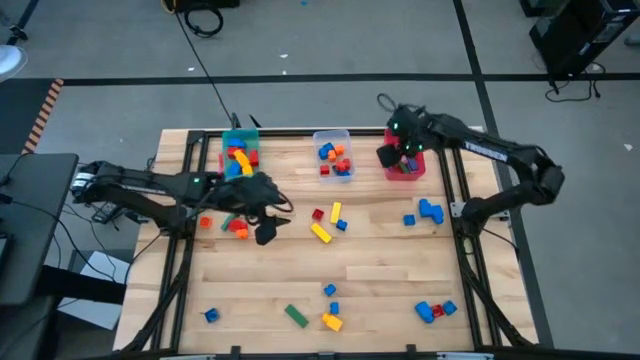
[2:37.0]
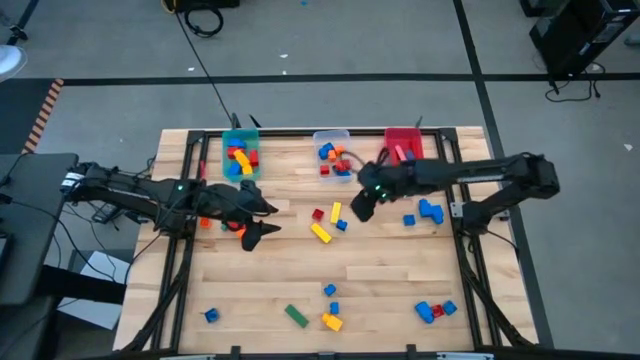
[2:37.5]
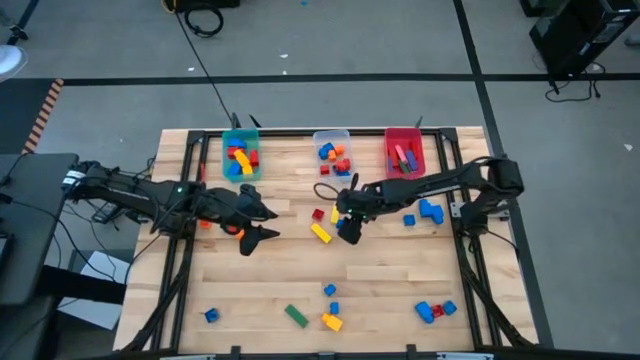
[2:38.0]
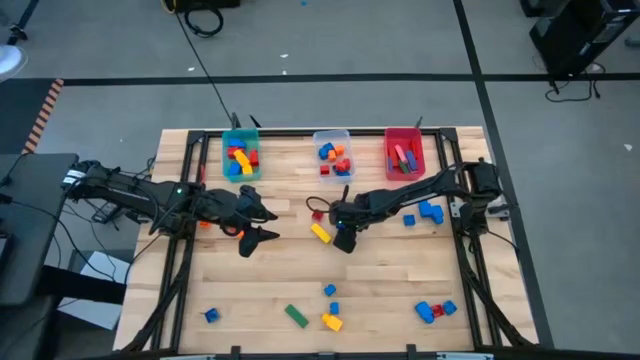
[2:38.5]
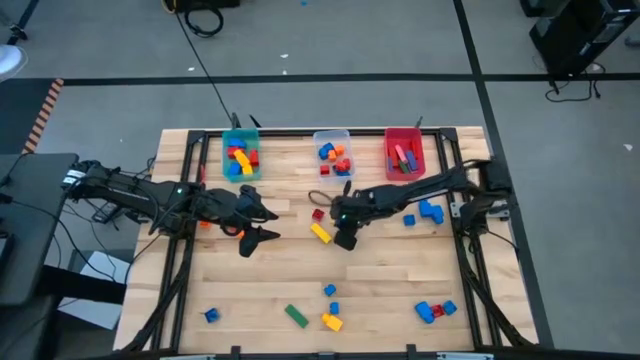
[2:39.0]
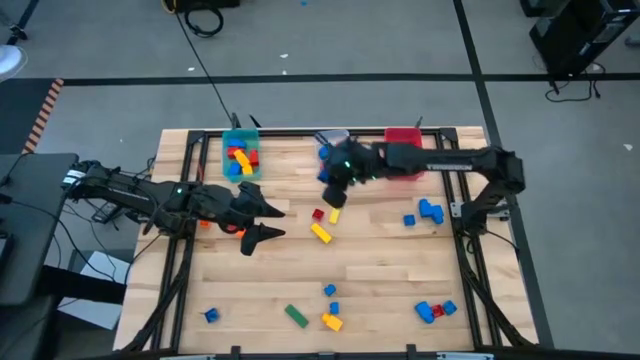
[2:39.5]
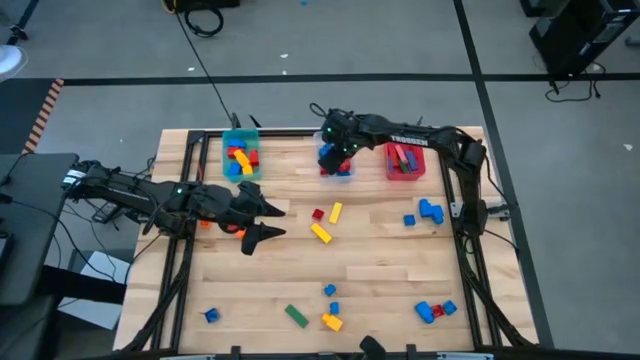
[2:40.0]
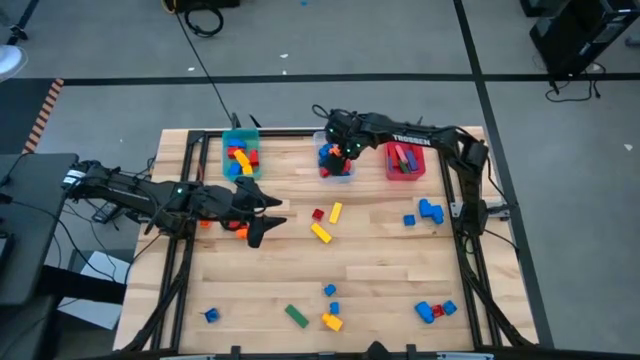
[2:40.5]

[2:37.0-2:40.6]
Task: Sort blocks by size
Put the blue 4 stud game piece into the transparent bin

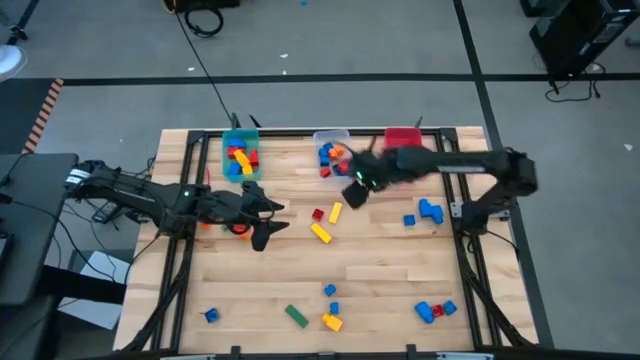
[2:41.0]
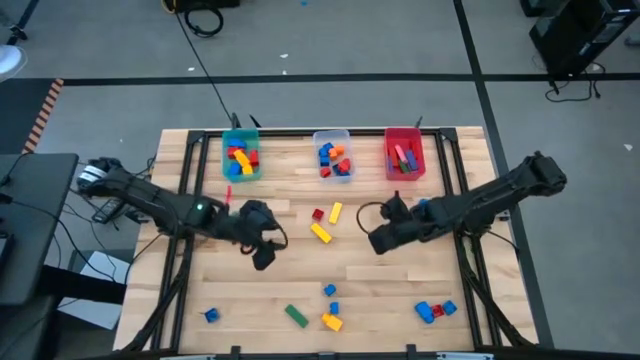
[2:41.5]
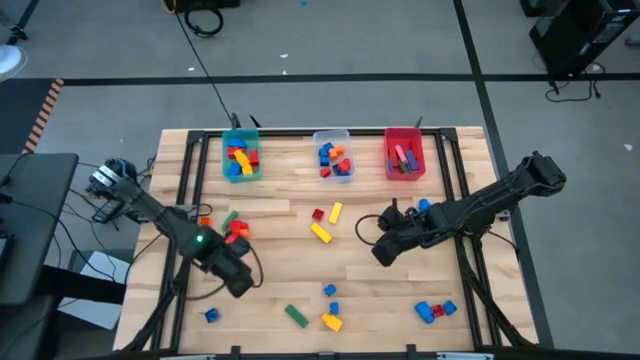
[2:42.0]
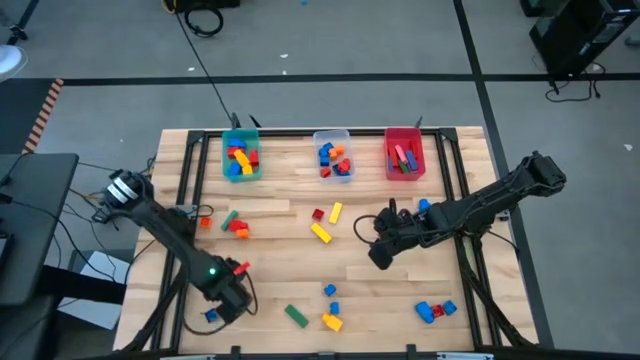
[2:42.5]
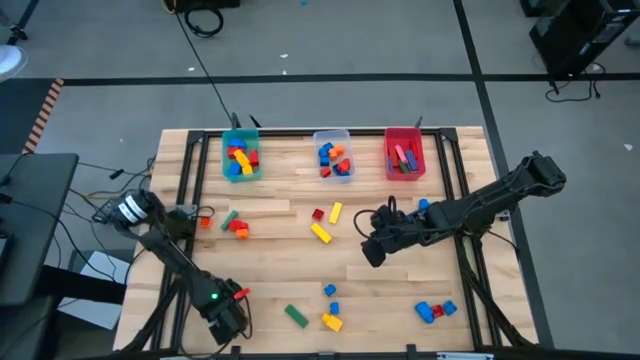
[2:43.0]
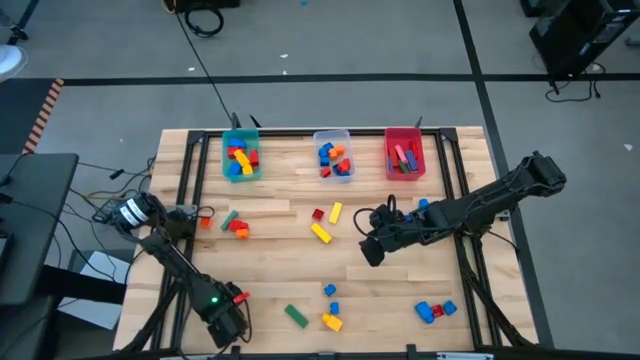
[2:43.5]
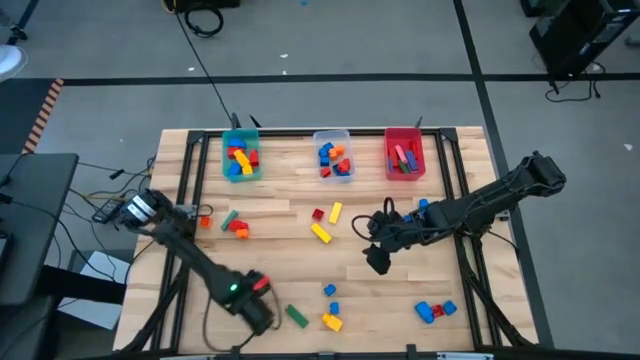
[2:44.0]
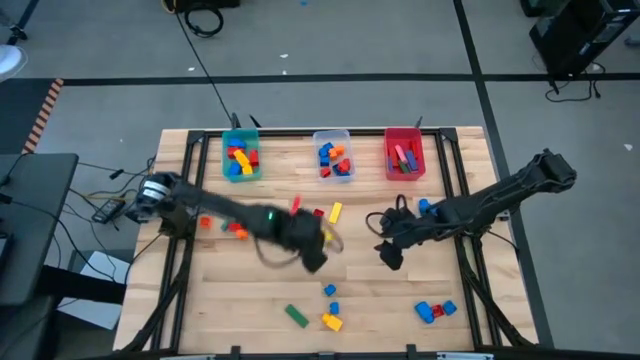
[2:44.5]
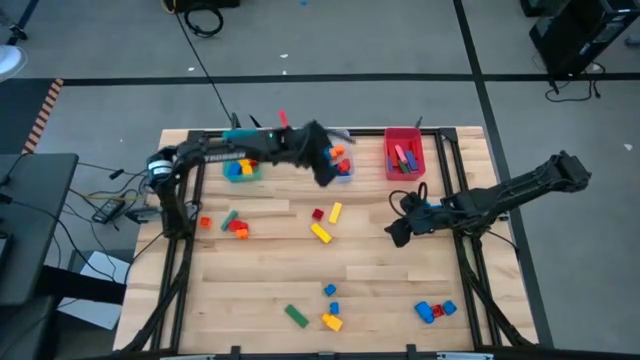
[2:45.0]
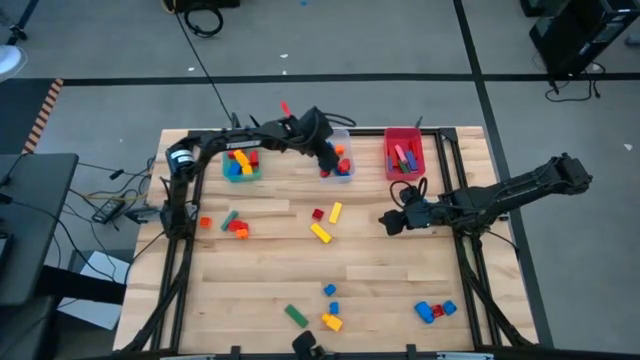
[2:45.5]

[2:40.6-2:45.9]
Put the blue 4 stud game piece into the transparent bin

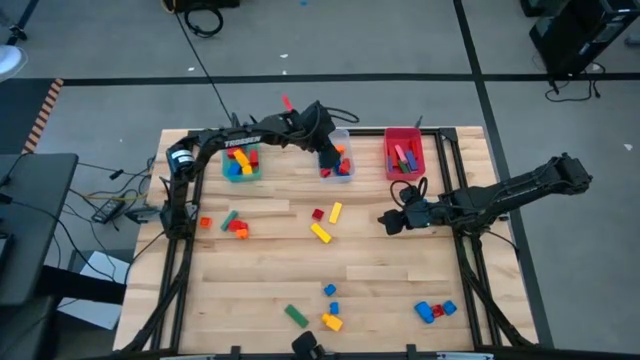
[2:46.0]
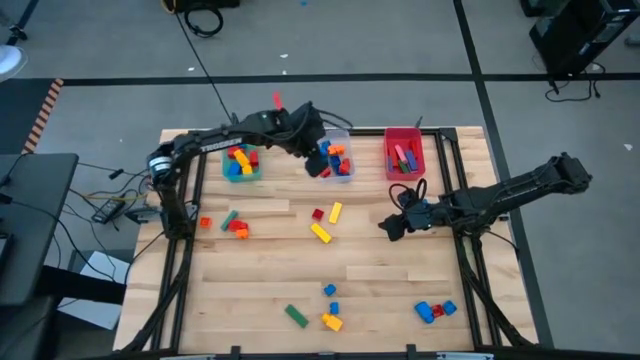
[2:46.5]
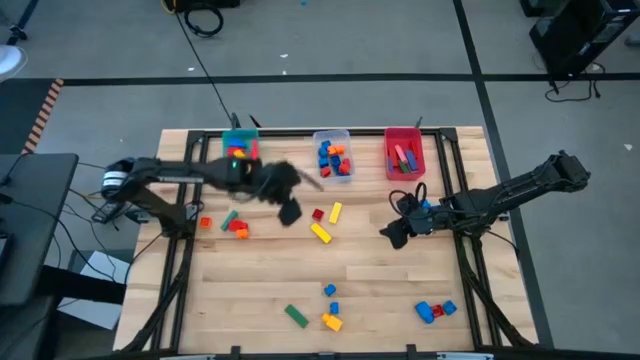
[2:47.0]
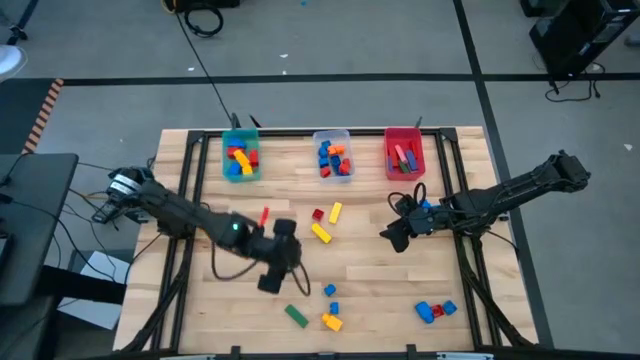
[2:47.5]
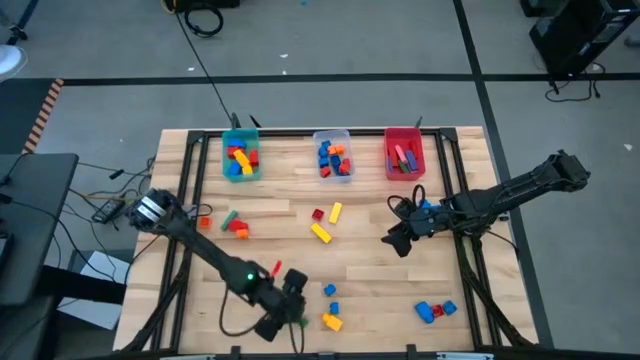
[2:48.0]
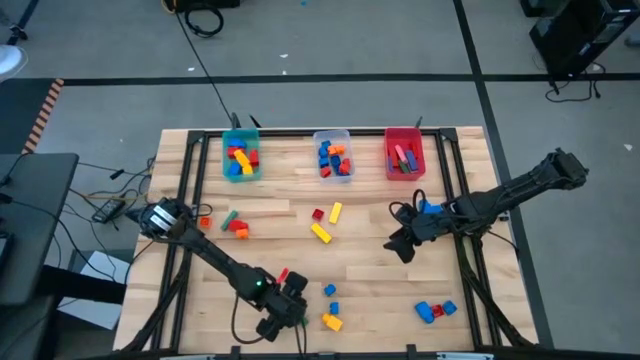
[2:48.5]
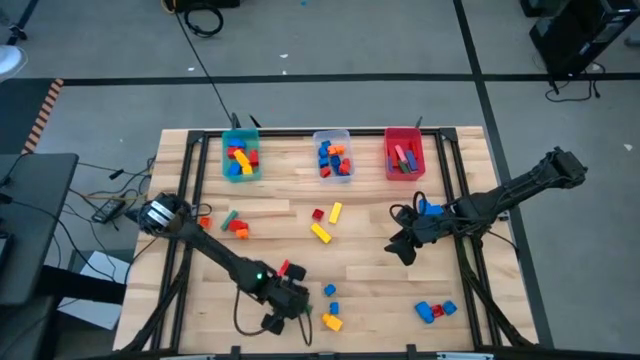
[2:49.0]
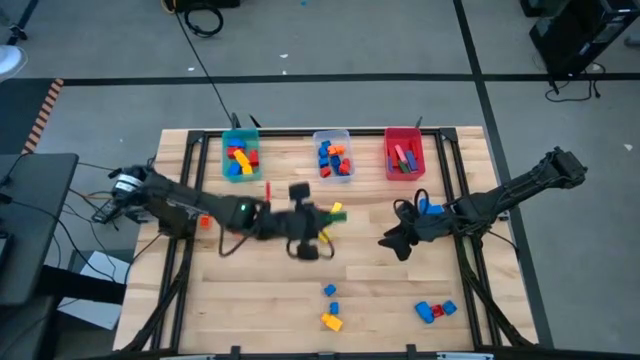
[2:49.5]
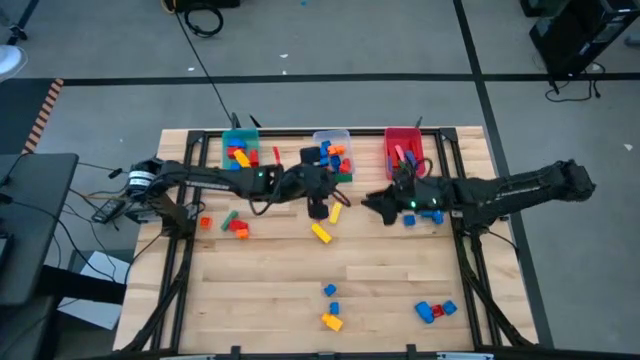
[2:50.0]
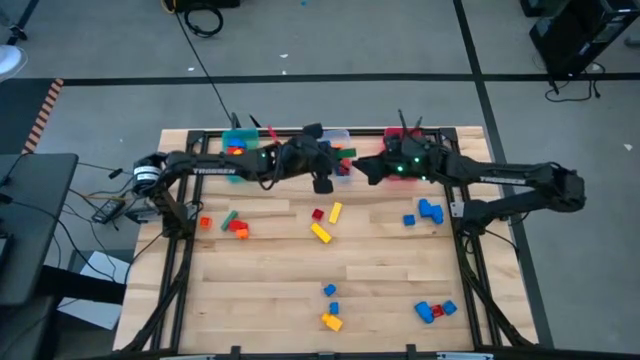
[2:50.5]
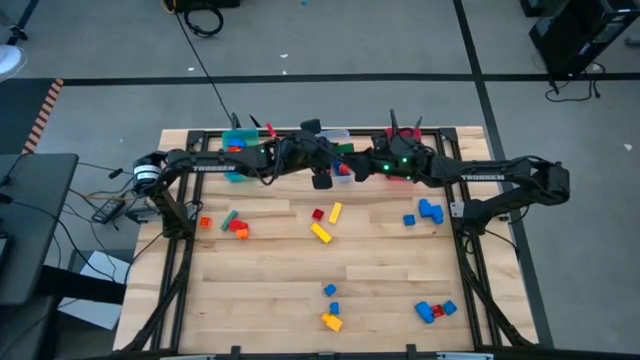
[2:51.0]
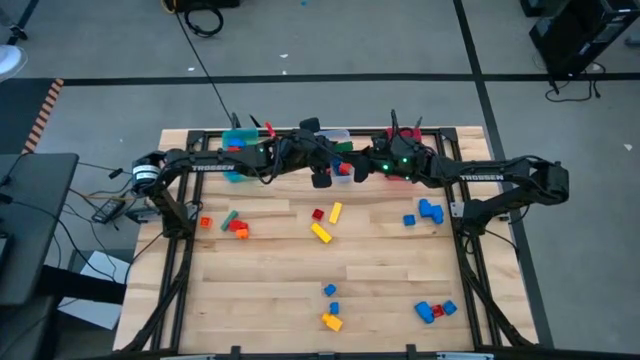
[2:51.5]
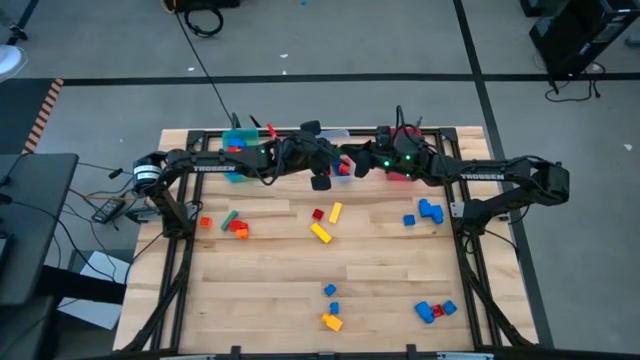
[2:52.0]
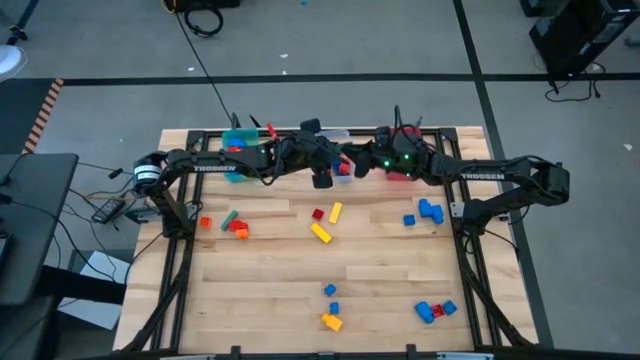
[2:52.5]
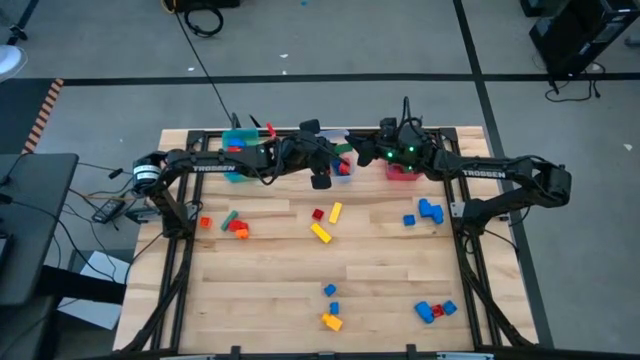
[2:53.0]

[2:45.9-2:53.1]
Put the green block into the red bin

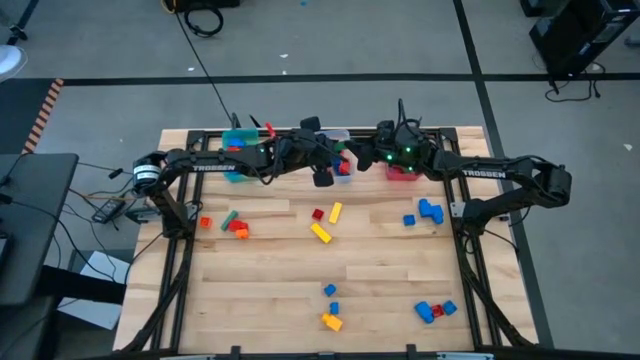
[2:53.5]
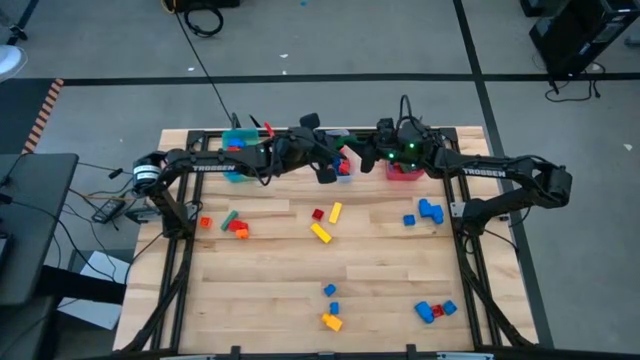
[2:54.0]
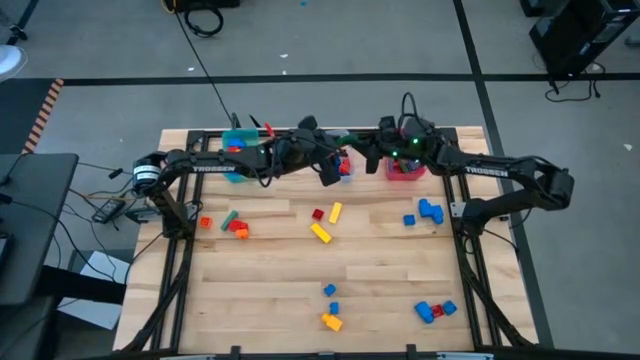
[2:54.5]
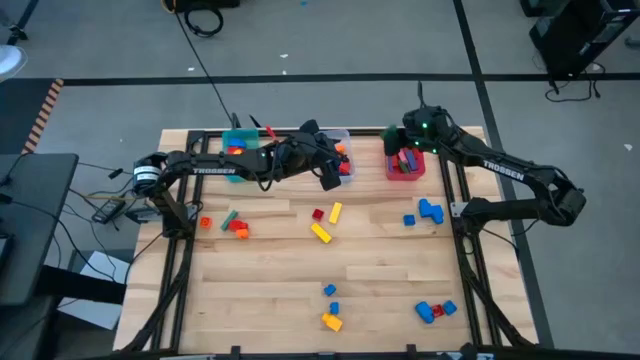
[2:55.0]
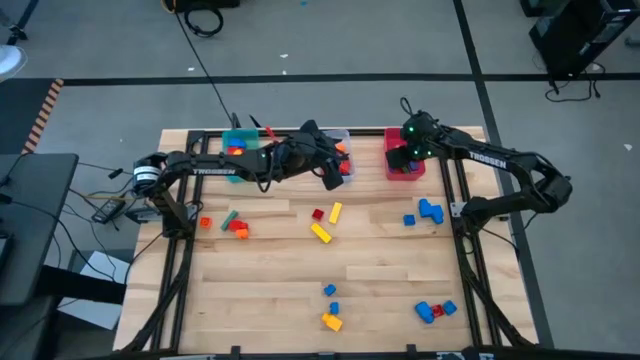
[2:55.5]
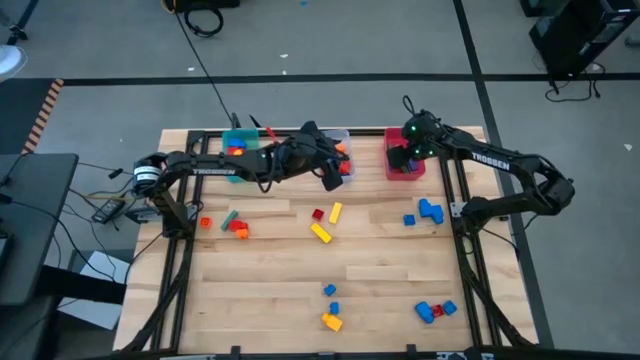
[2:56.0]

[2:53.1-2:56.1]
Put the green block into the red bin

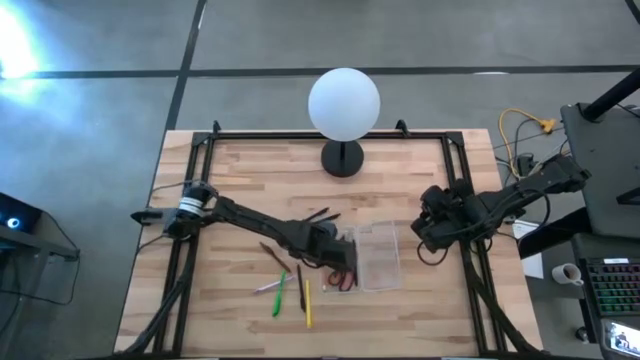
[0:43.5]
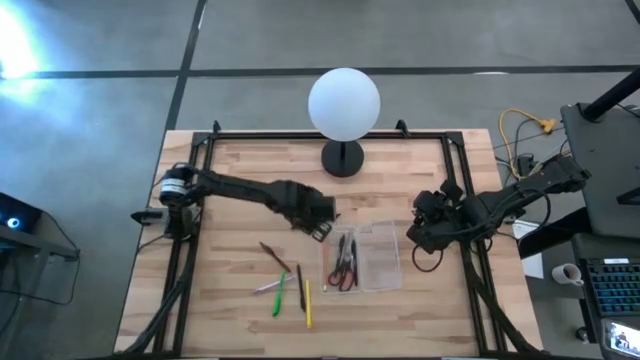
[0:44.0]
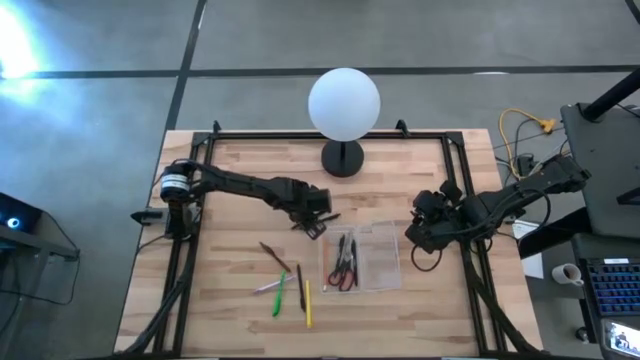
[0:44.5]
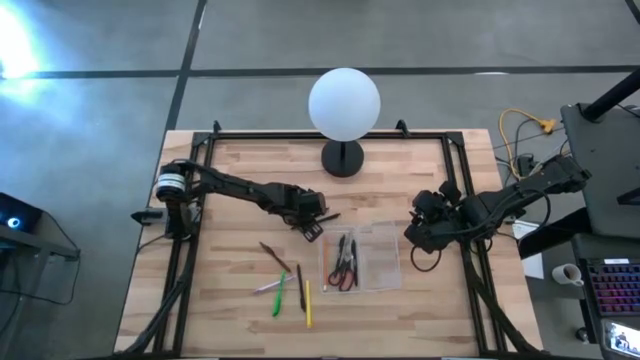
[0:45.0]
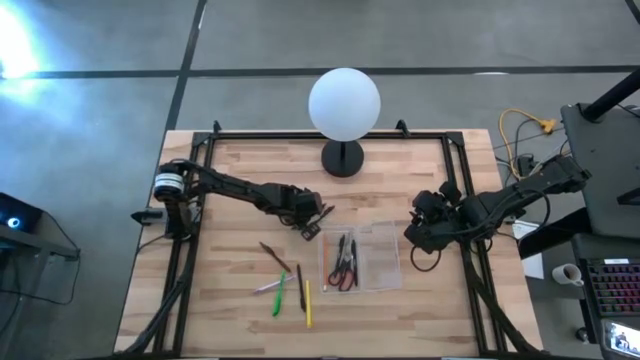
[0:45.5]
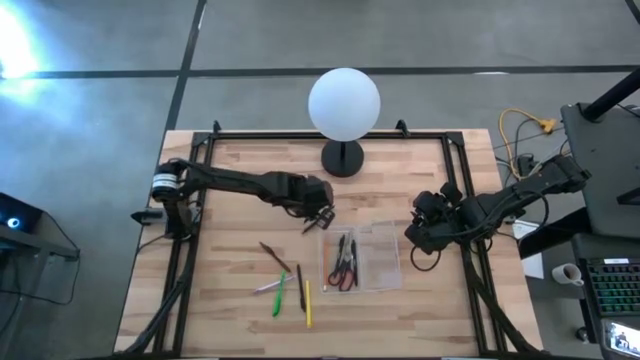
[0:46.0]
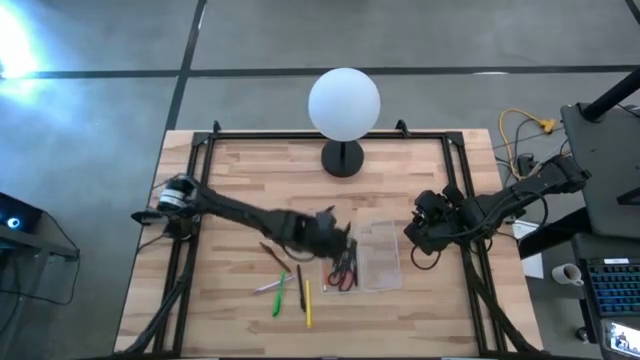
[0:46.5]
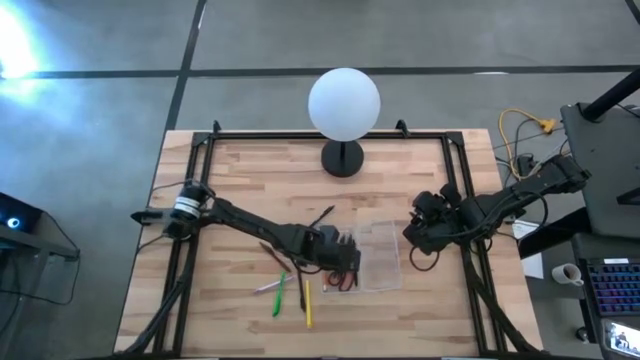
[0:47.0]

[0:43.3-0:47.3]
Task: Pick & place school supplies into a supply box
Put the top black pen into the transparent supply box
